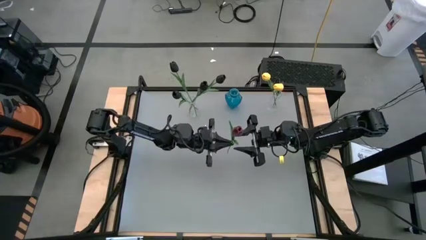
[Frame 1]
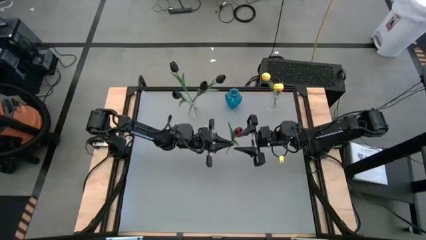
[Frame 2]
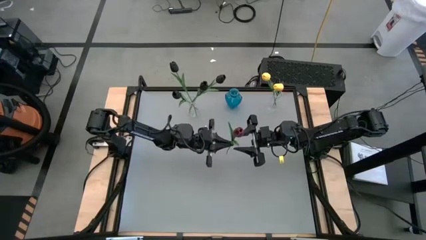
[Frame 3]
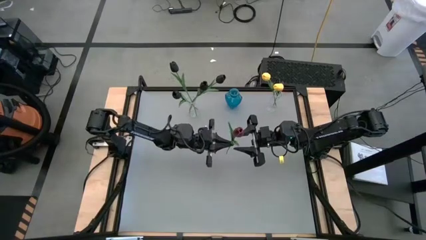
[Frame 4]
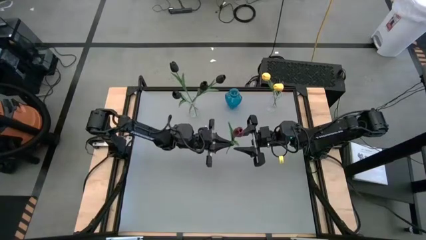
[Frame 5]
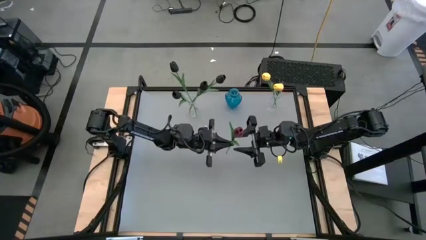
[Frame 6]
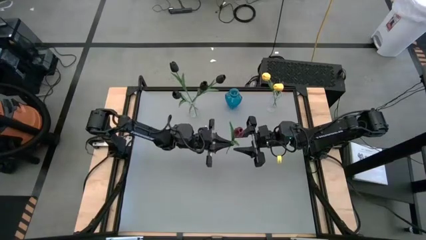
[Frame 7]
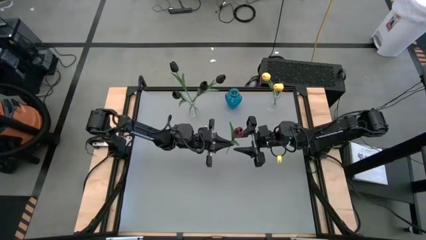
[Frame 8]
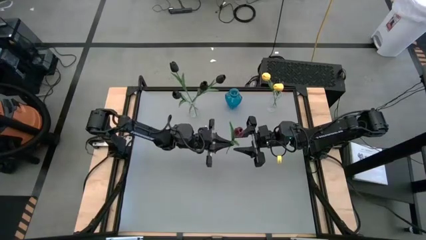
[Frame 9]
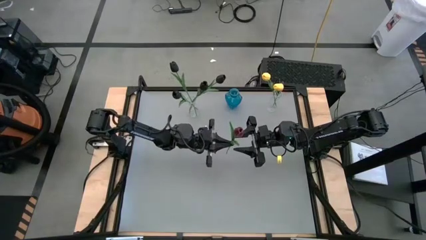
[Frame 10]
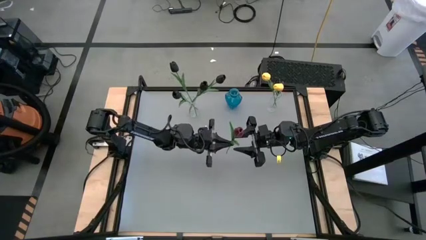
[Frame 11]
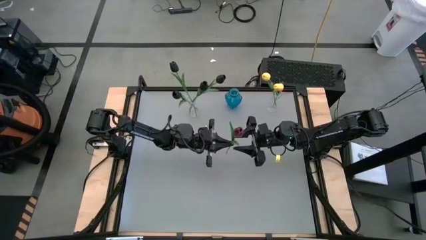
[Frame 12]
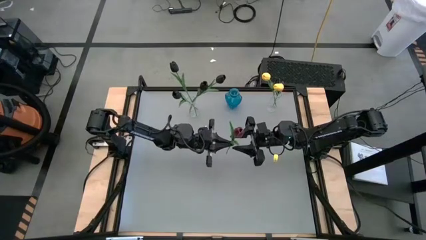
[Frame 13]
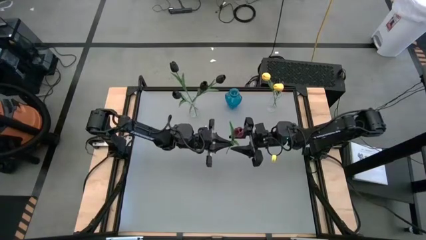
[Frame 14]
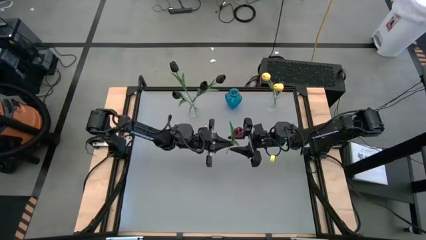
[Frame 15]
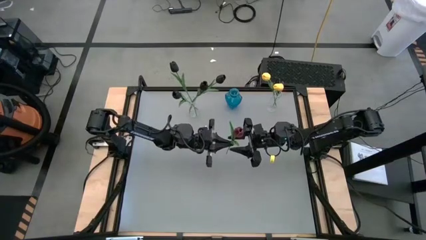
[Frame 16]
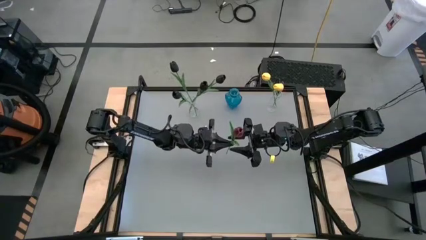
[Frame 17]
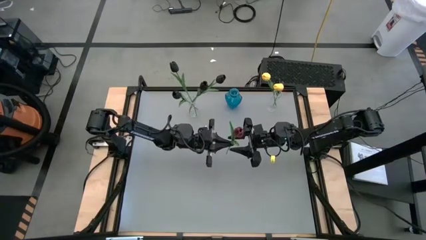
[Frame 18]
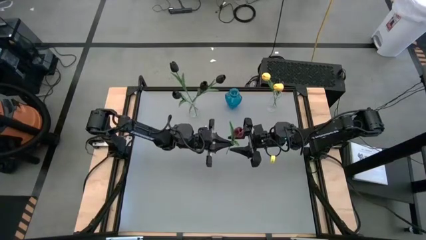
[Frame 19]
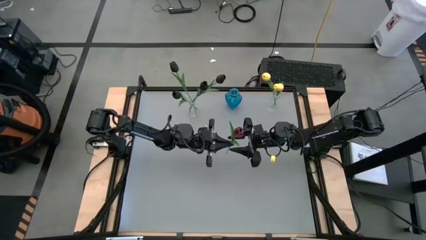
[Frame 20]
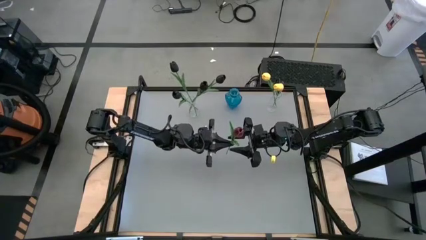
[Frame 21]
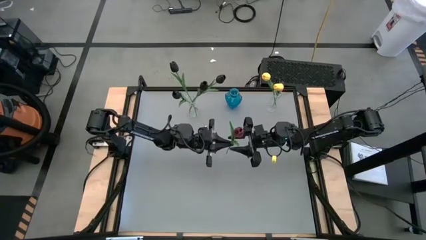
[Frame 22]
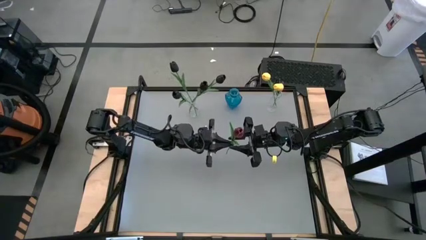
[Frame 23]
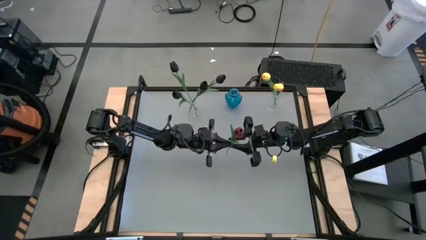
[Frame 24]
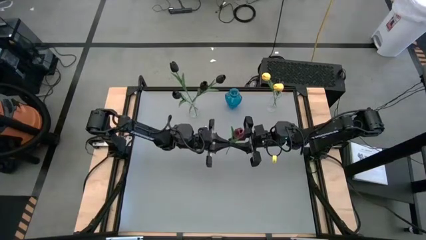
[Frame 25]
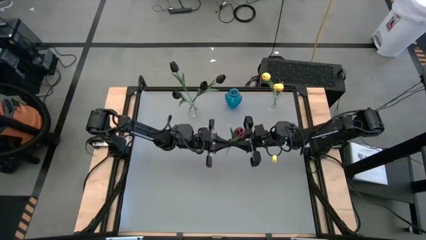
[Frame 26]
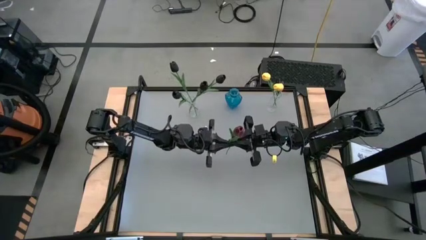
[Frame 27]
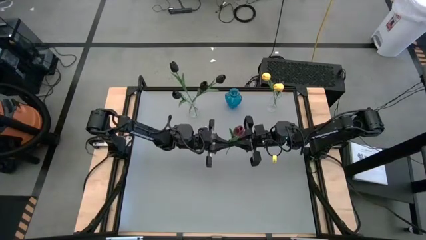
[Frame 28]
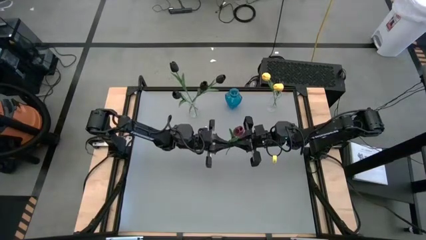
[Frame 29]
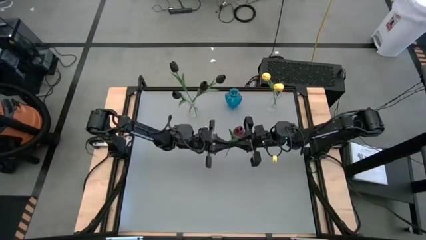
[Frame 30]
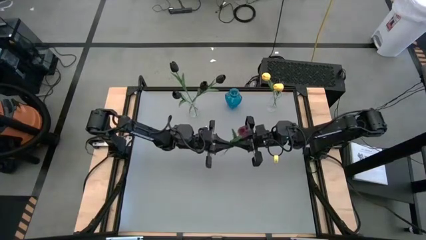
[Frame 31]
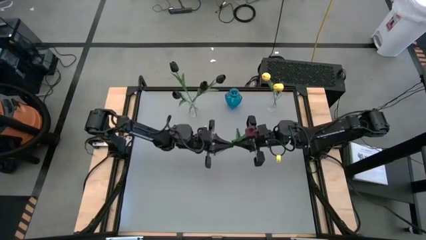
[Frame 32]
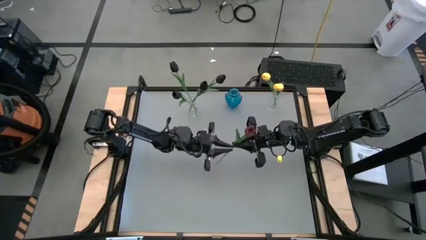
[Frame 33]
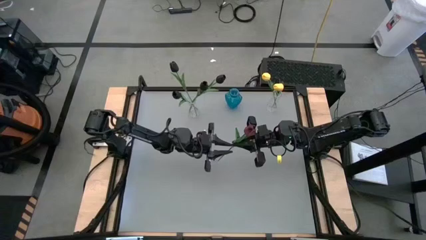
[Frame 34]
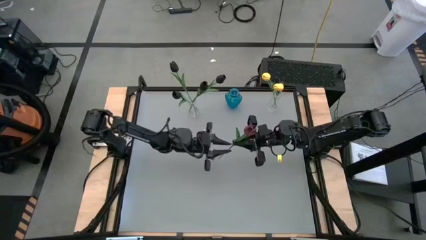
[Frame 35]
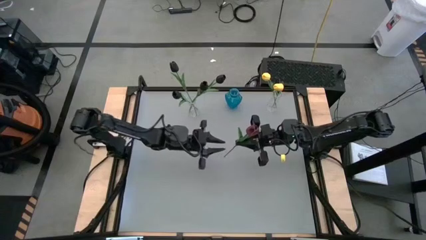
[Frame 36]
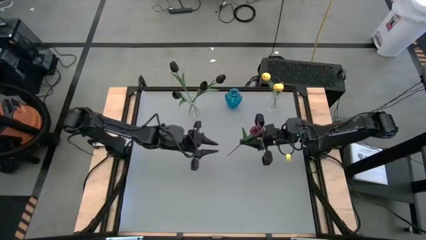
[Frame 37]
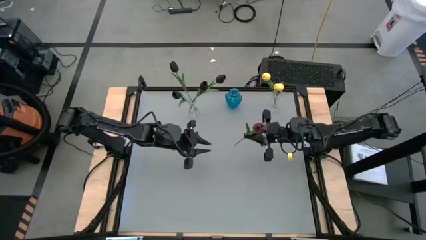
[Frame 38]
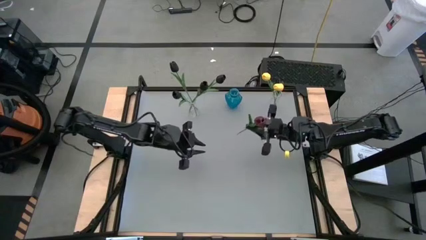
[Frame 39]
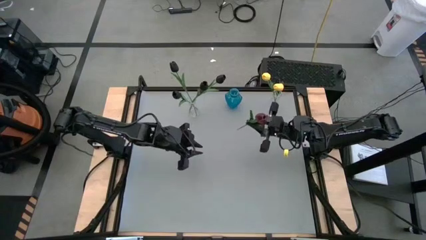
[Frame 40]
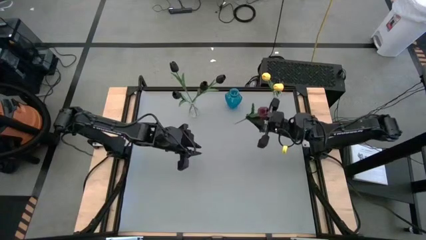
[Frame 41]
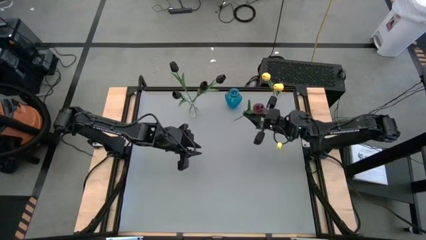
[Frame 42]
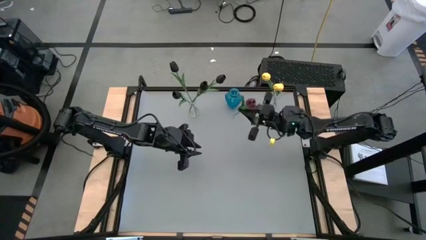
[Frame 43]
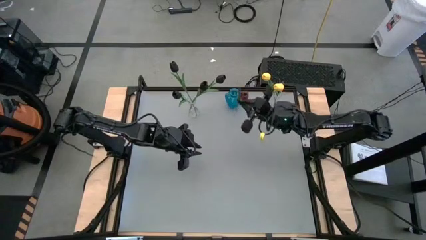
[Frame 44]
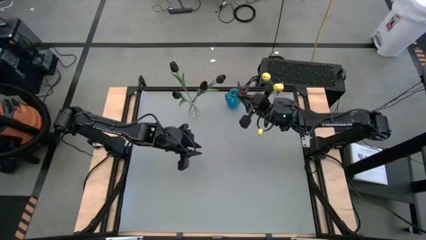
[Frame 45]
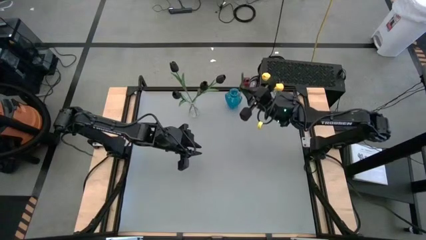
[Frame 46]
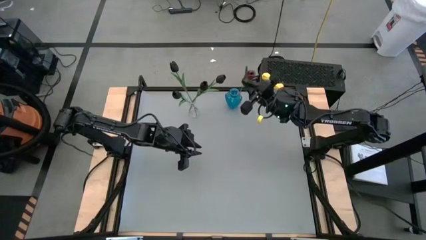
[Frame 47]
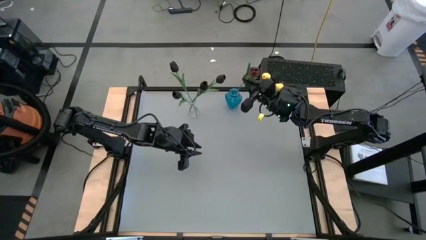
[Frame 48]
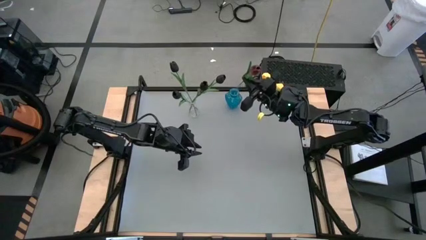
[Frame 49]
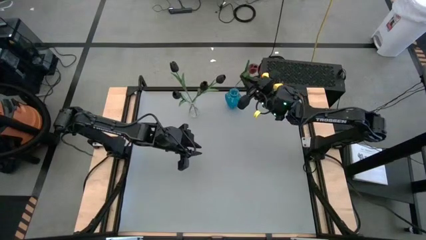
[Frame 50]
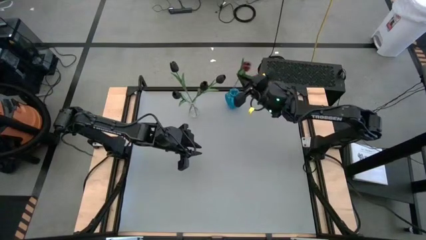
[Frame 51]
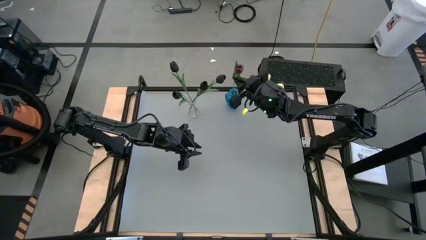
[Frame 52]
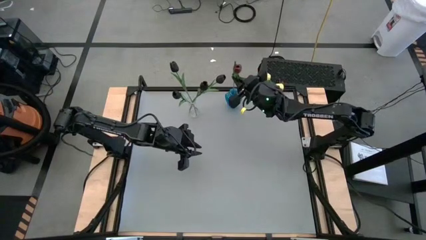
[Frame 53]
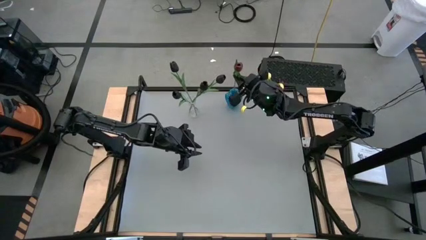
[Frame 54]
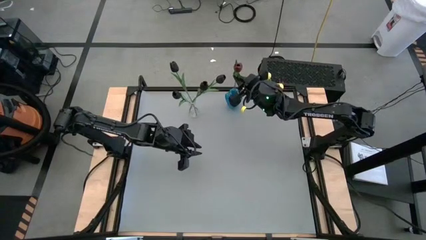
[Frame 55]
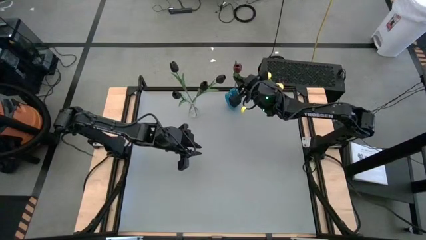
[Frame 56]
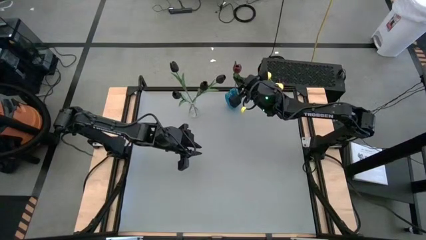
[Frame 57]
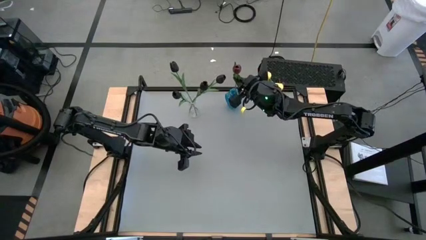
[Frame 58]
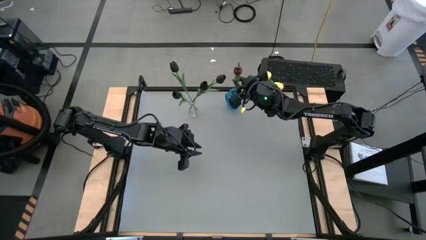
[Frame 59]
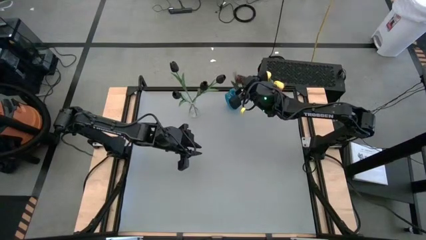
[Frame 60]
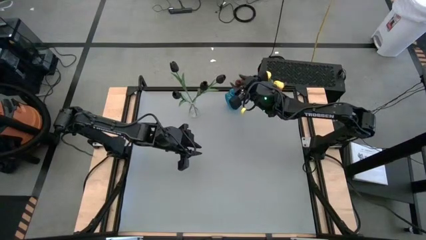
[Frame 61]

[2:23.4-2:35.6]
Task: Sort flowers into vase by color
Put the red flower into the blue flower vase

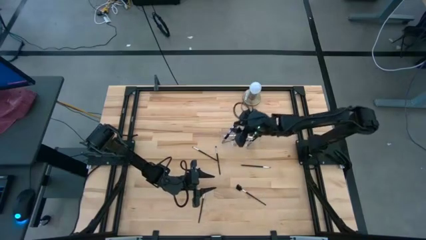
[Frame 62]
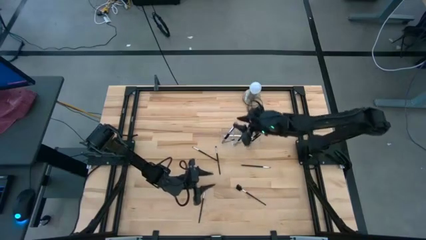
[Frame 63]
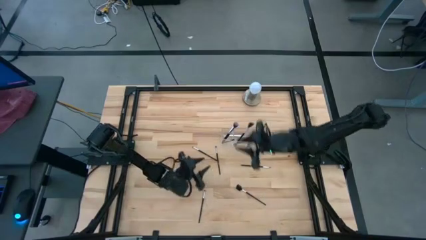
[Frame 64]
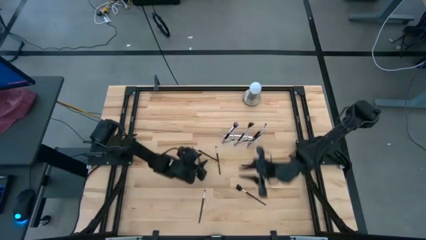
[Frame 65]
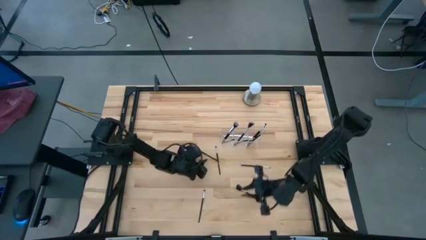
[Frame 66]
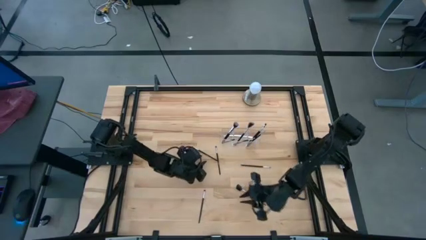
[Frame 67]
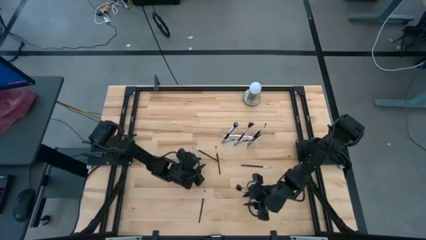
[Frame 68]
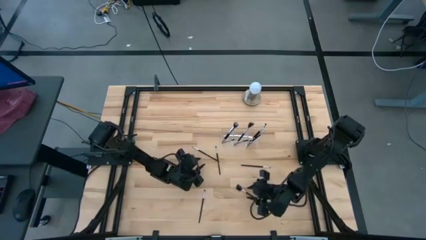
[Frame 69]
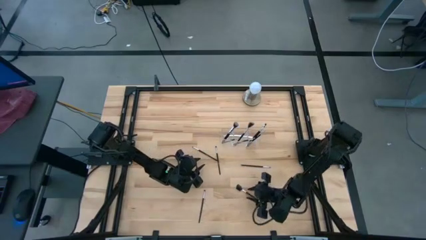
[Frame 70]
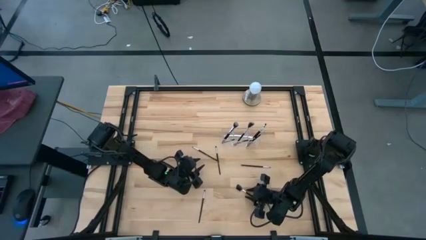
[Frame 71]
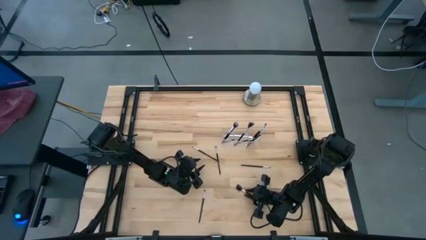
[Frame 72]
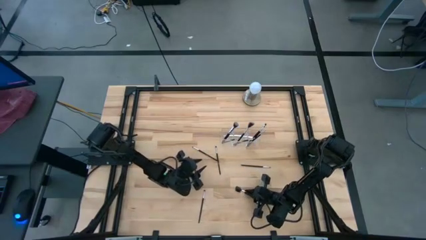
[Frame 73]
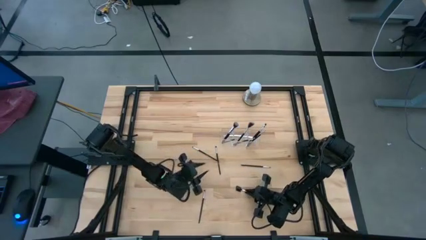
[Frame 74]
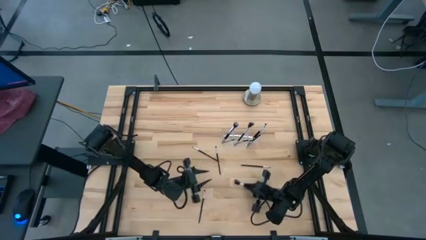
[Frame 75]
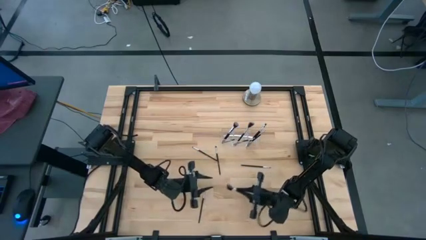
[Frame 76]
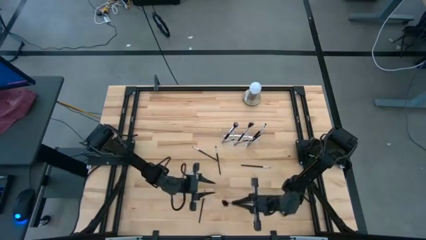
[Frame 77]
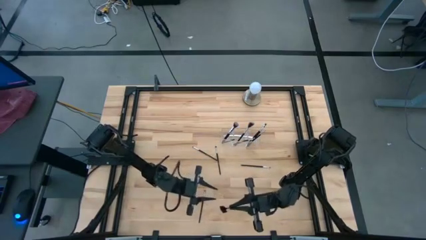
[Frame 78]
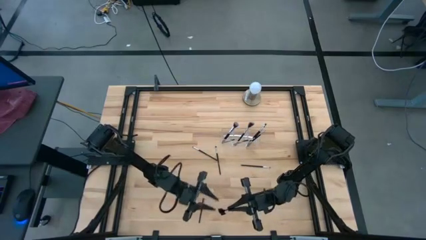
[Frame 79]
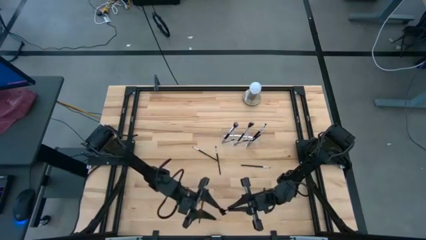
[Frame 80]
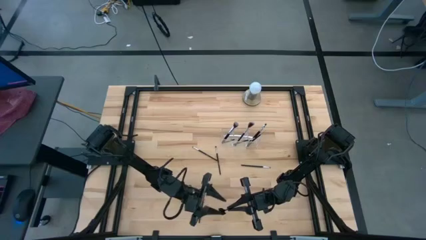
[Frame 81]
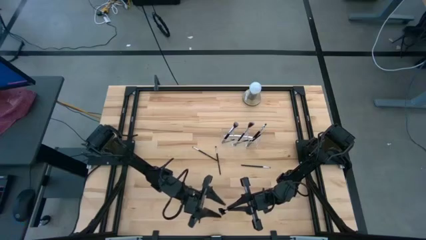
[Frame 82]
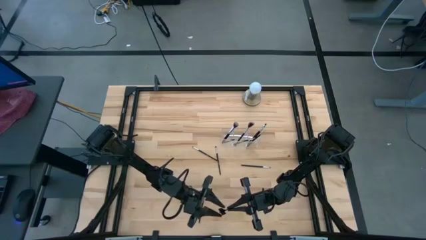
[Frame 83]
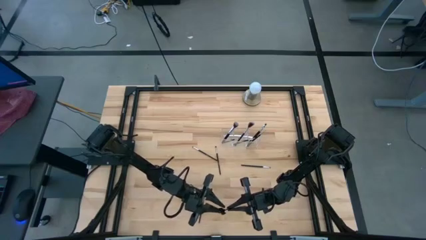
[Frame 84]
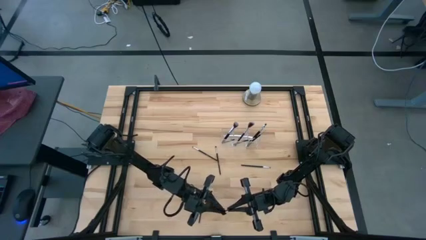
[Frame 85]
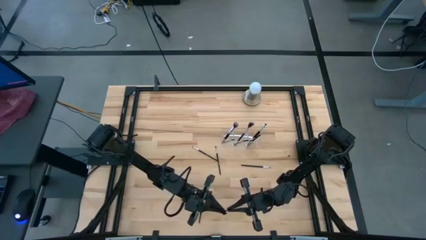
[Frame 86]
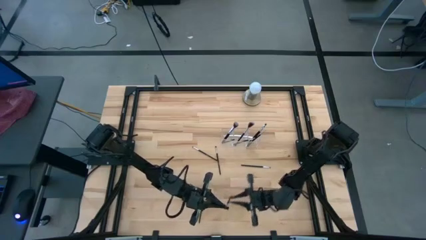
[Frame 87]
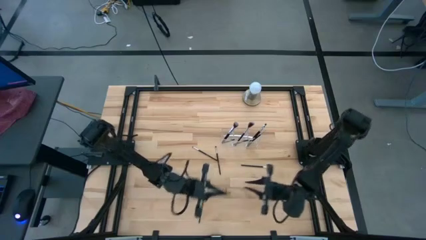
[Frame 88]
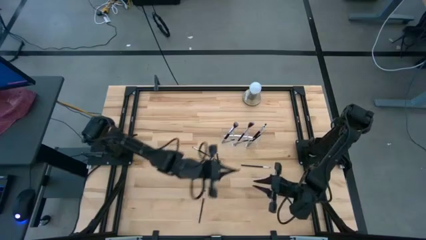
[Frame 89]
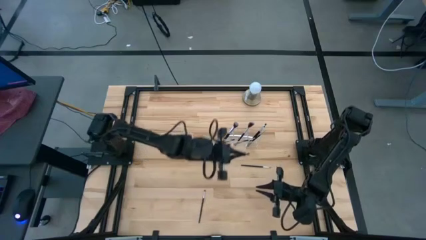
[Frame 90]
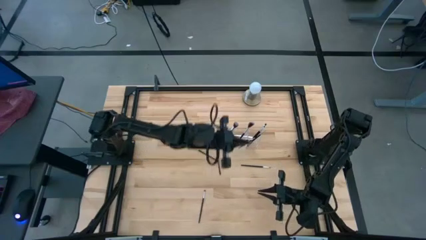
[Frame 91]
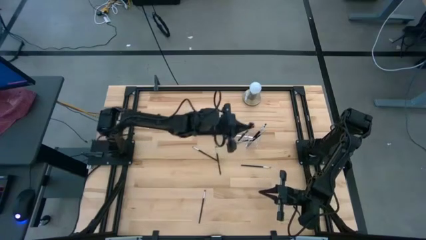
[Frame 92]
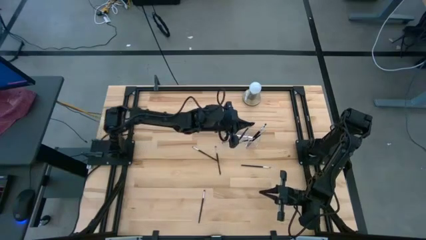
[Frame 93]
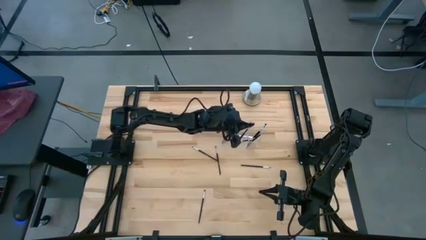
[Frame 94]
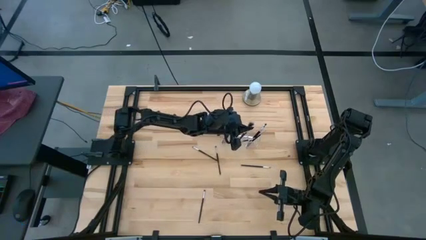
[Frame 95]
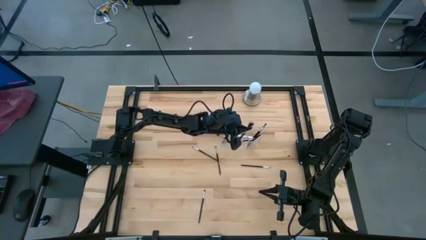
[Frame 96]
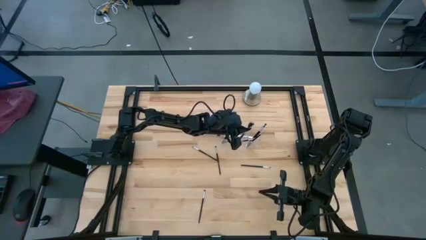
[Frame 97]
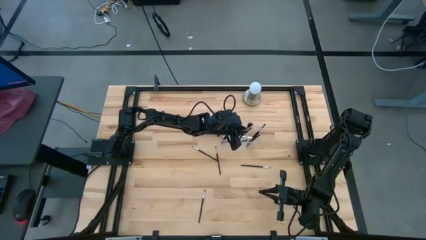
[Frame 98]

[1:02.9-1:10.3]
Task: Put items in baskets/containers
Put the black brow brush into the transparent organizer
